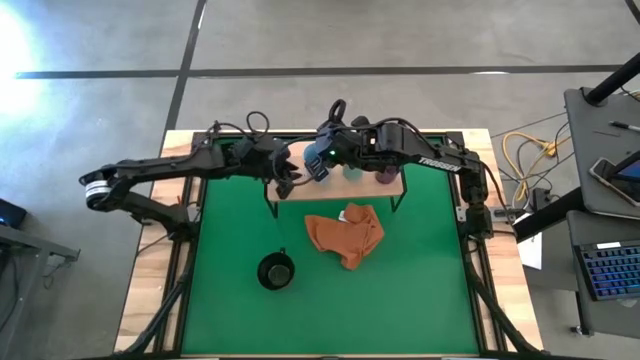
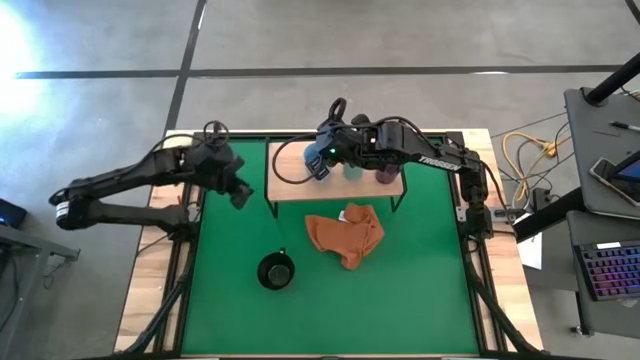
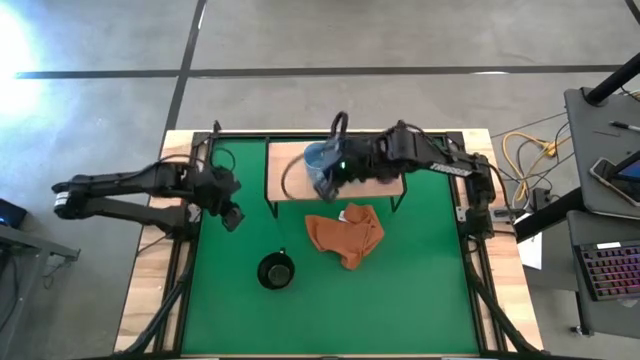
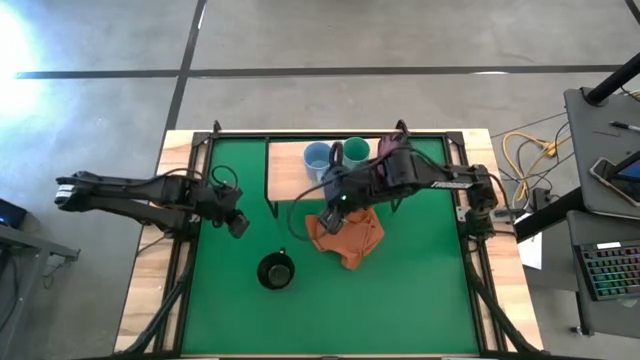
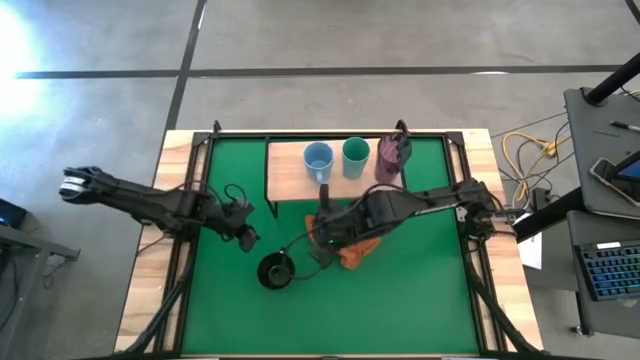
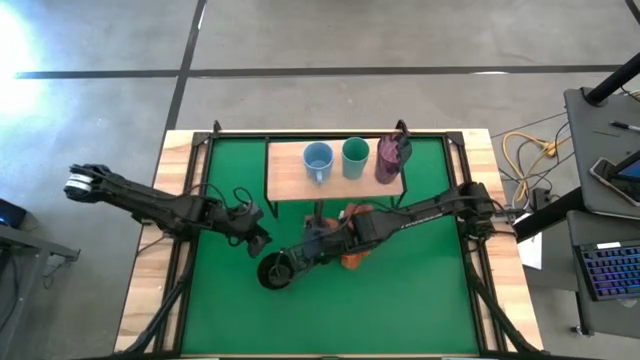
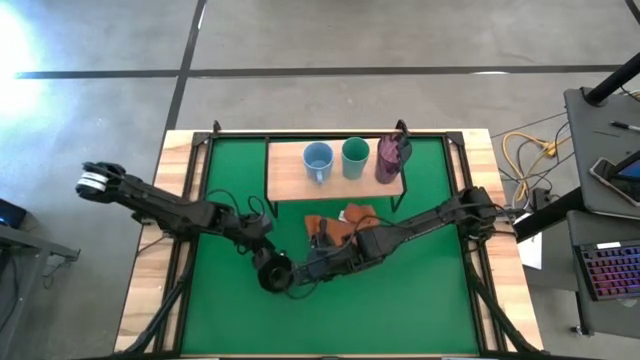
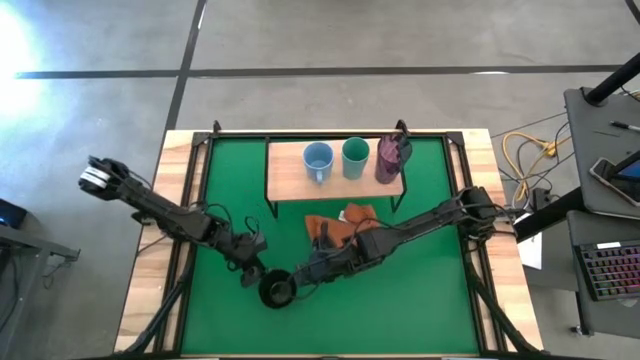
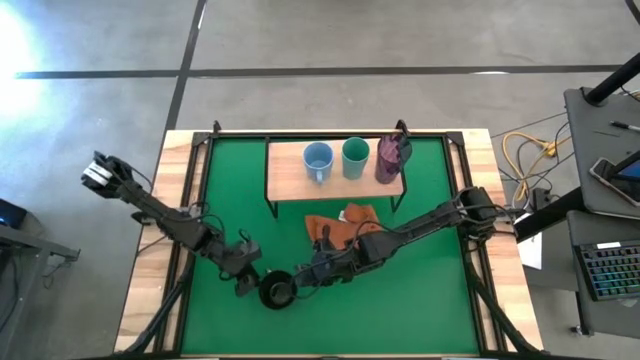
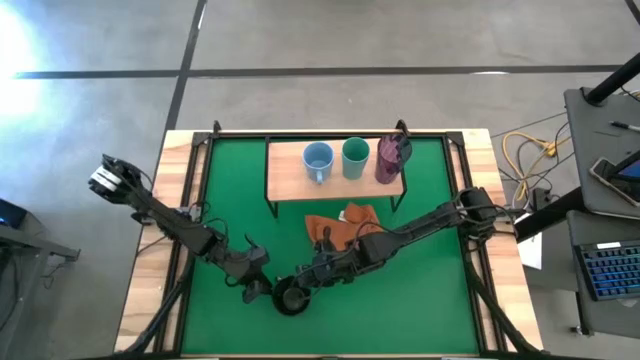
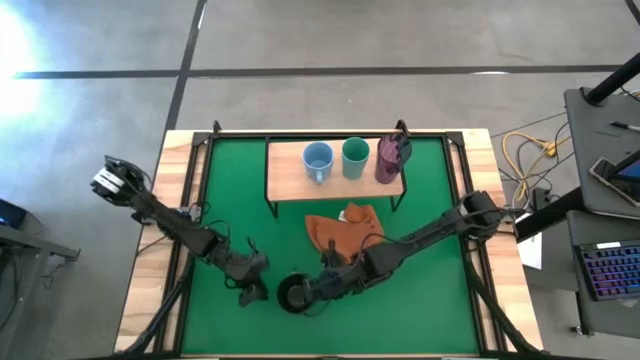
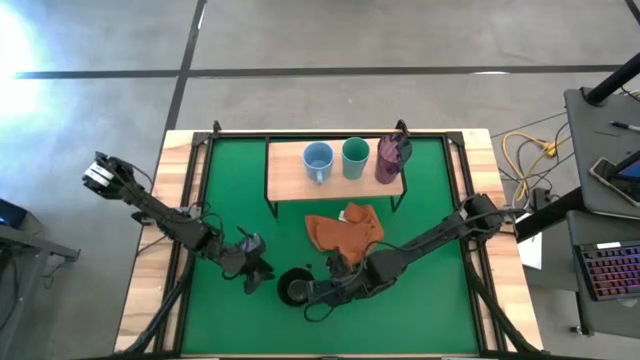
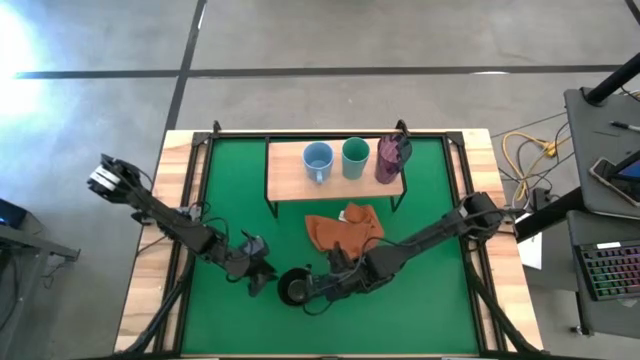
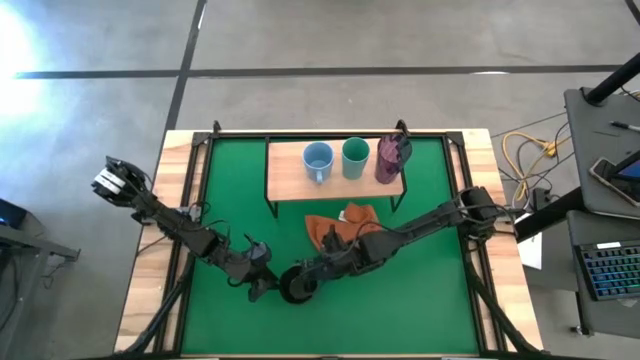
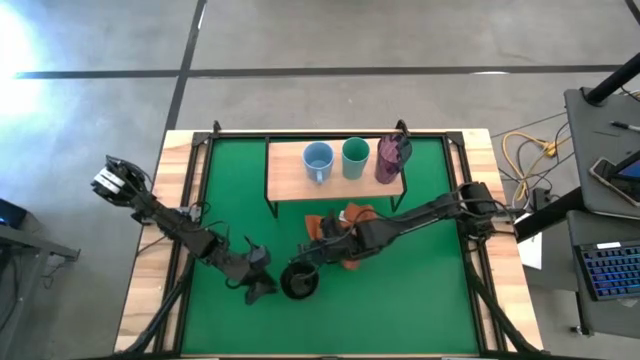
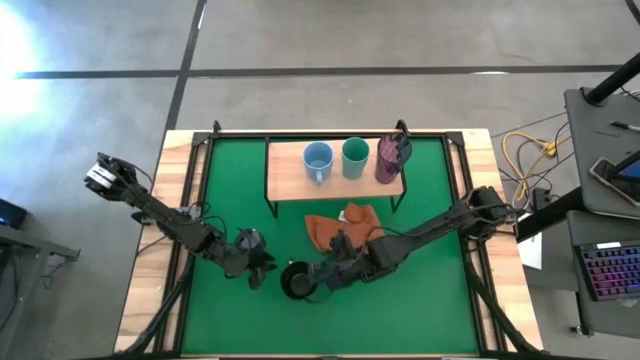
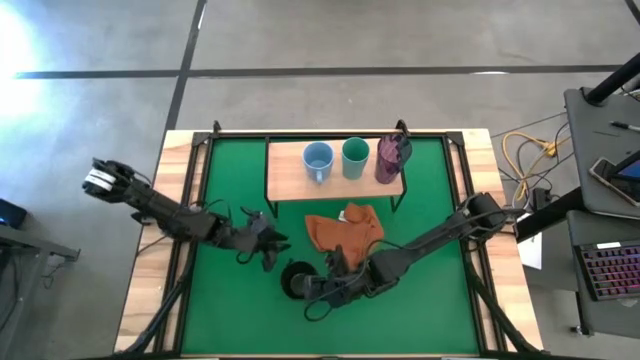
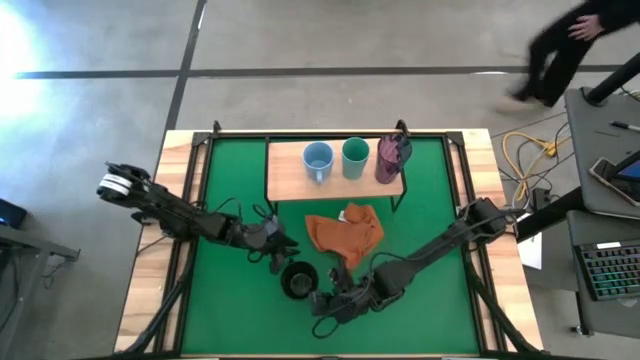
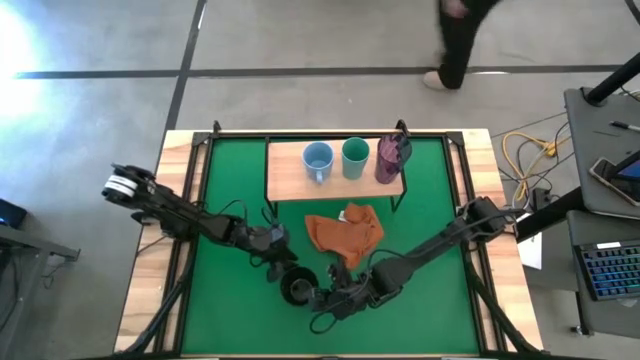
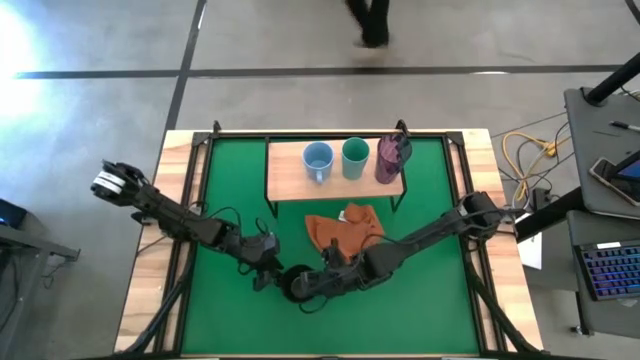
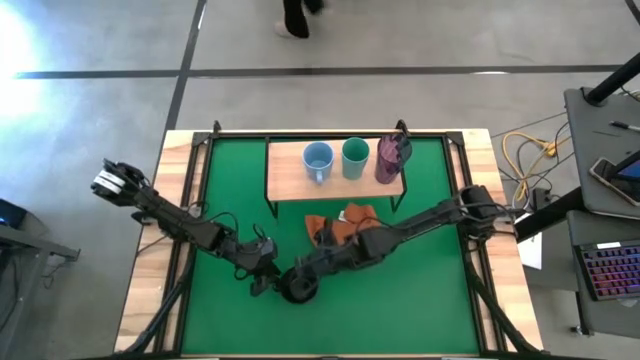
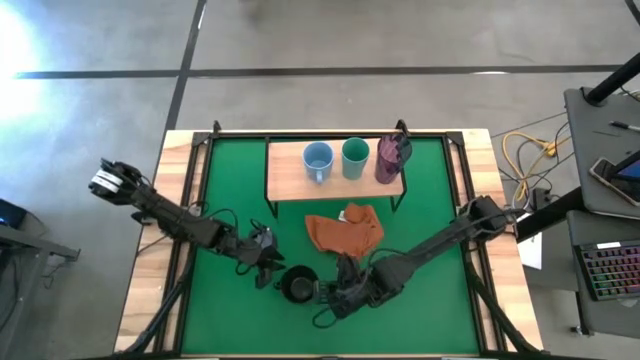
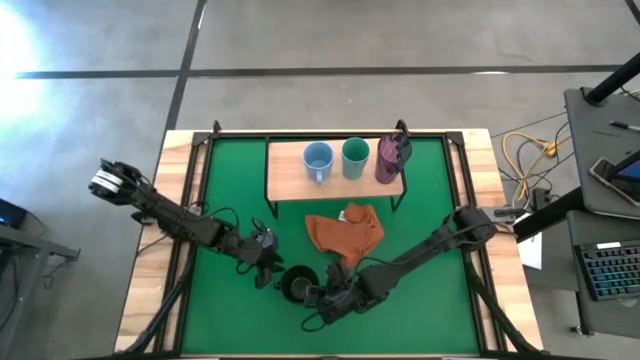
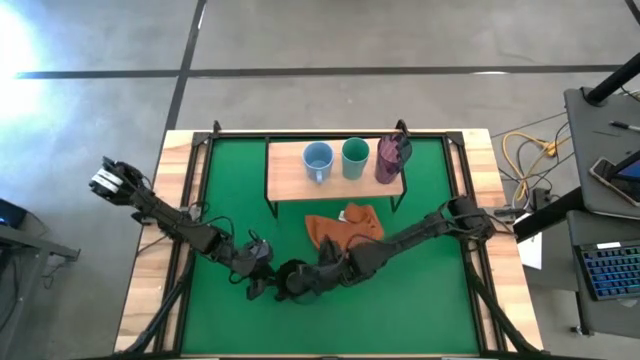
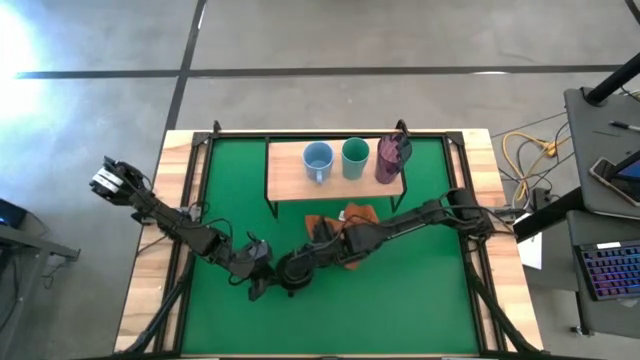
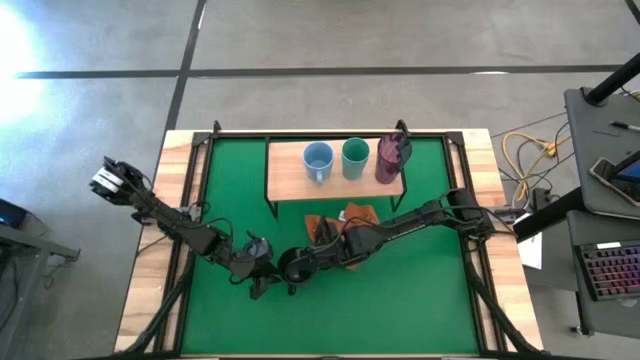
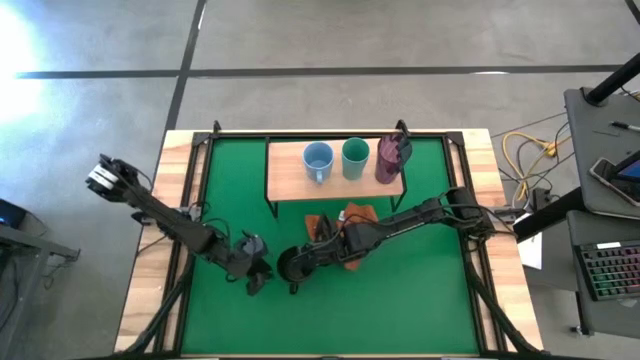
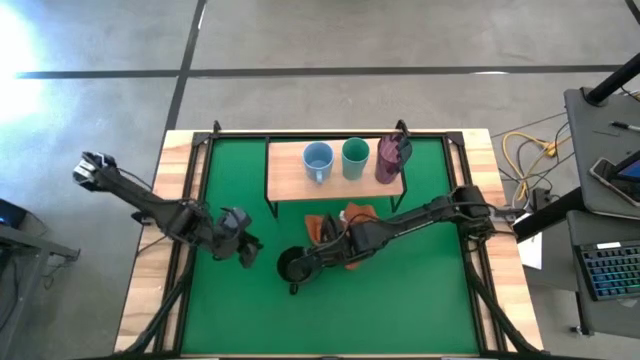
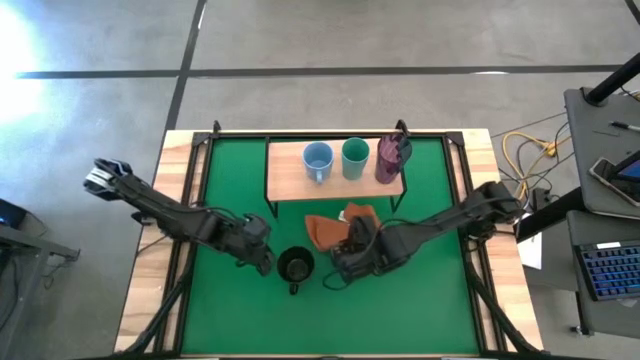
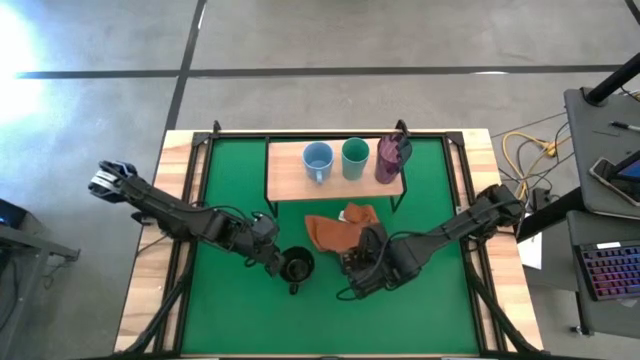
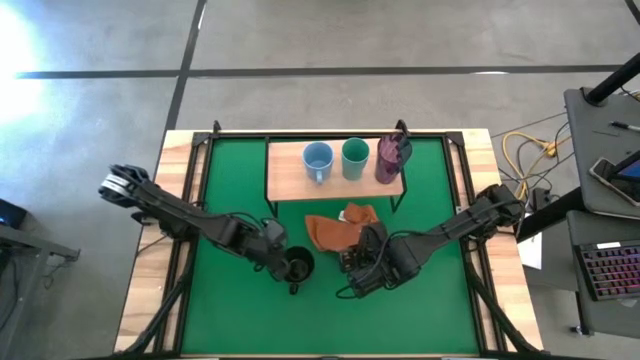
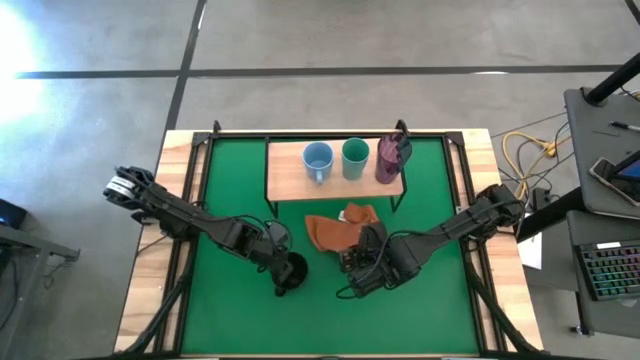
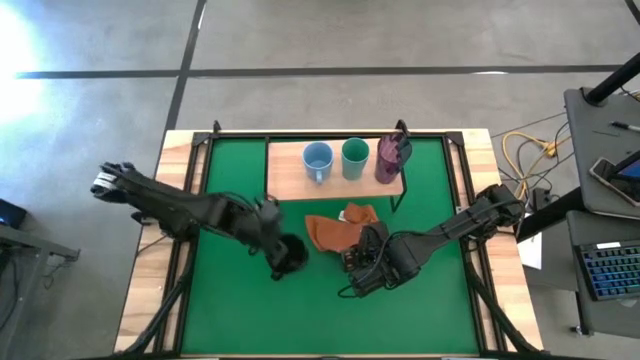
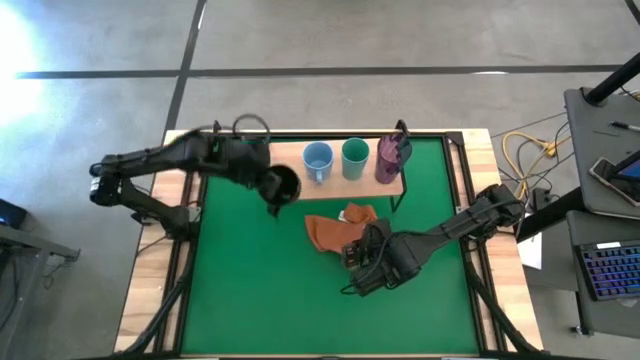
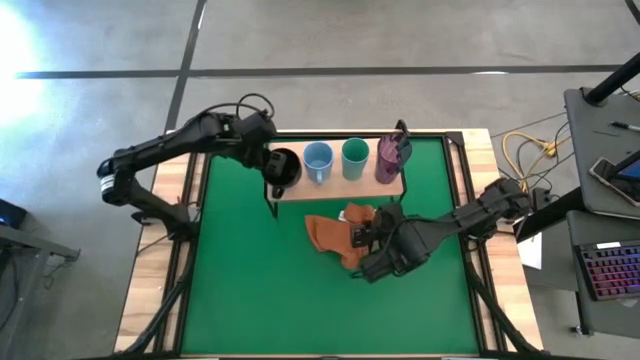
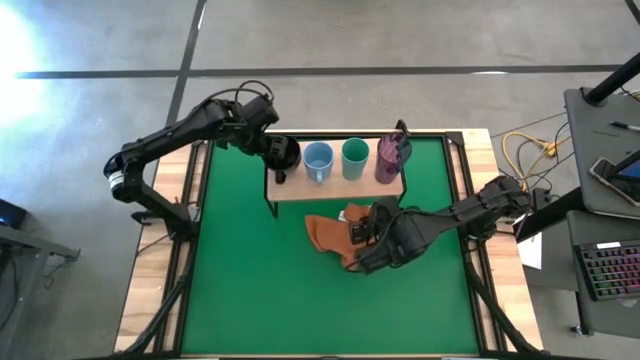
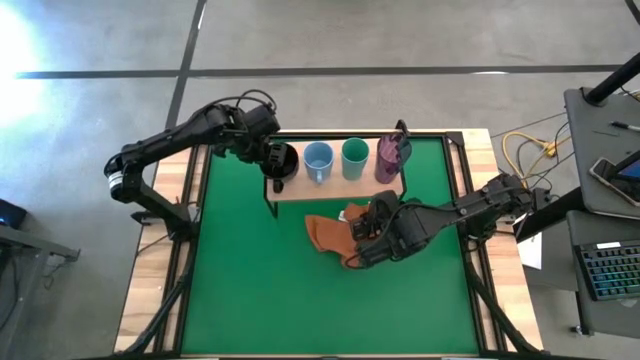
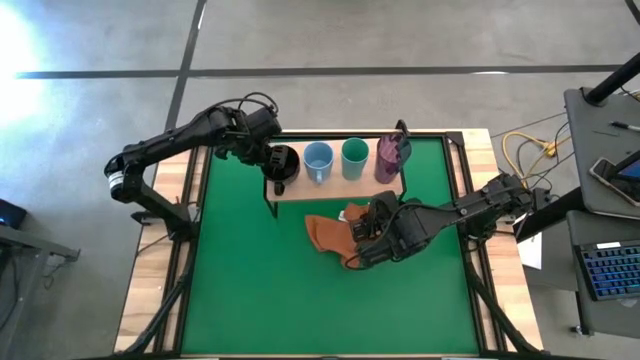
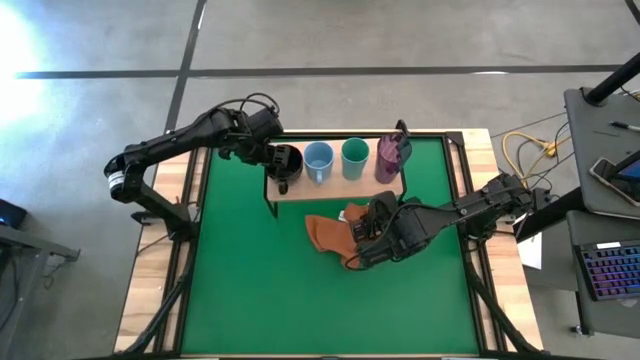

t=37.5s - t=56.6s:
Task: Stack small to large cups/mugs on shelf
Put the black mug on the shelf
